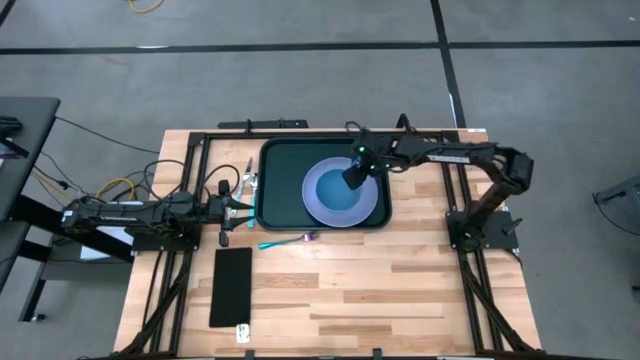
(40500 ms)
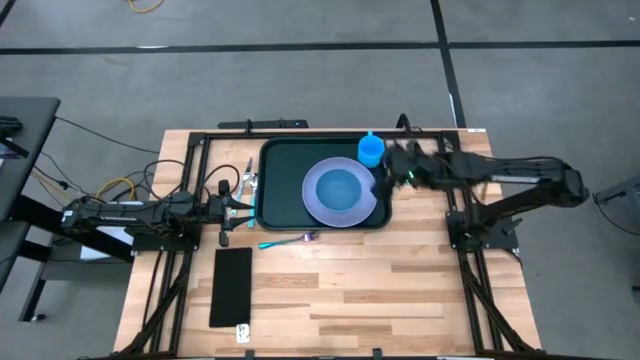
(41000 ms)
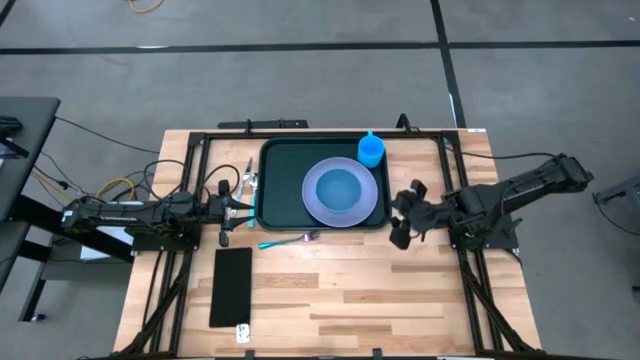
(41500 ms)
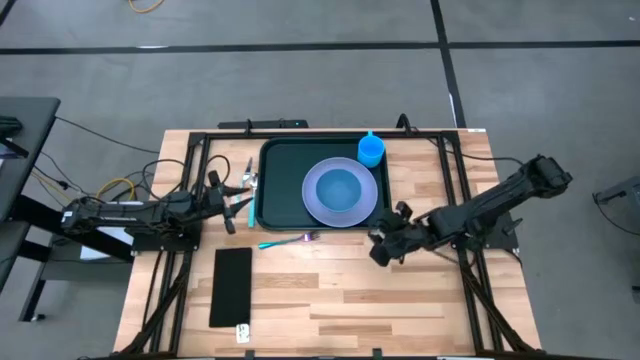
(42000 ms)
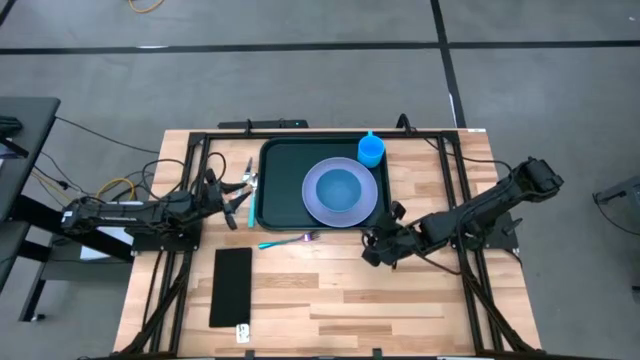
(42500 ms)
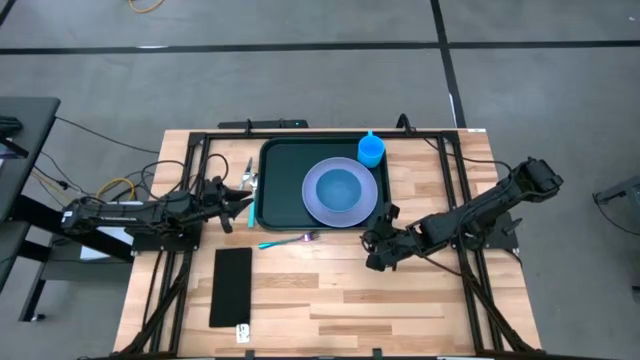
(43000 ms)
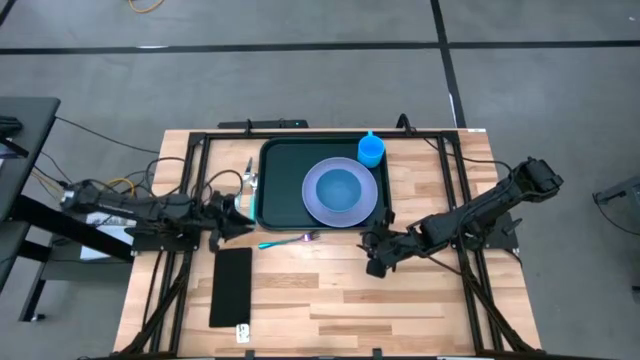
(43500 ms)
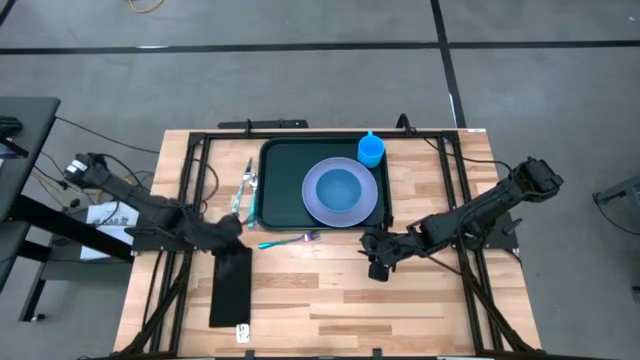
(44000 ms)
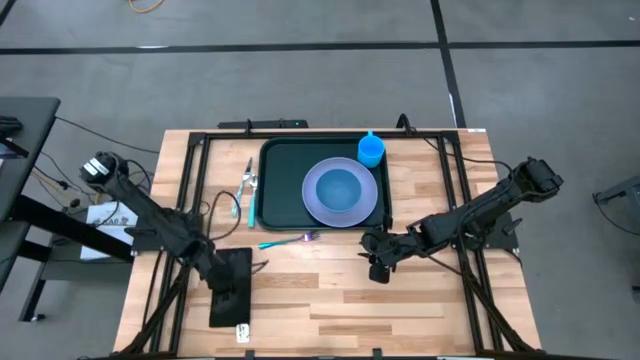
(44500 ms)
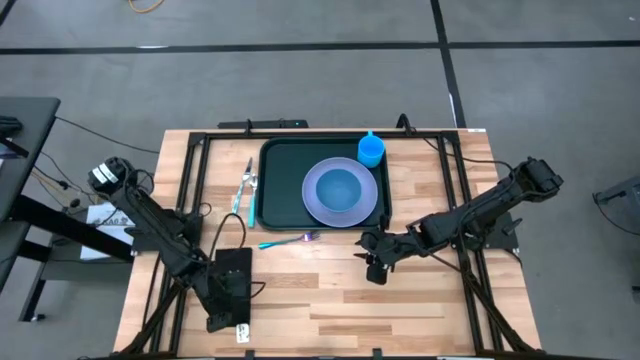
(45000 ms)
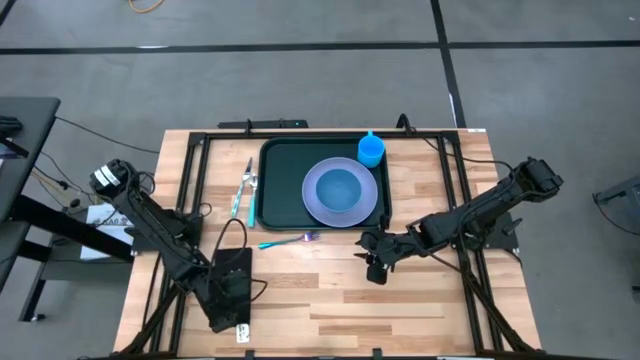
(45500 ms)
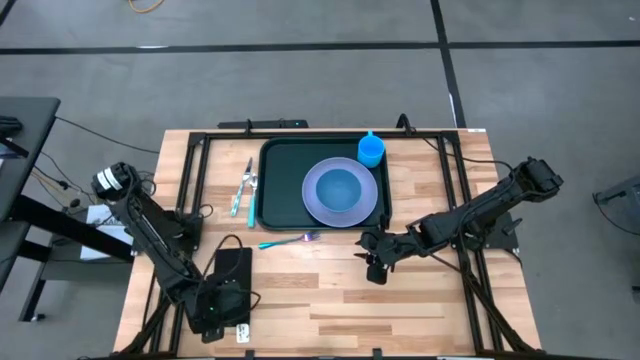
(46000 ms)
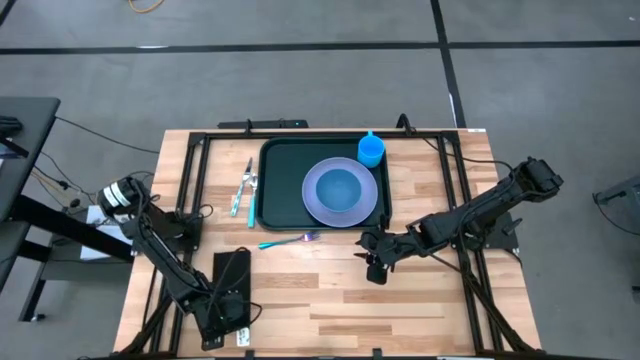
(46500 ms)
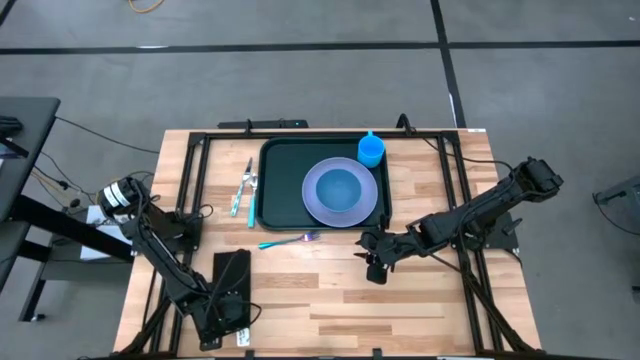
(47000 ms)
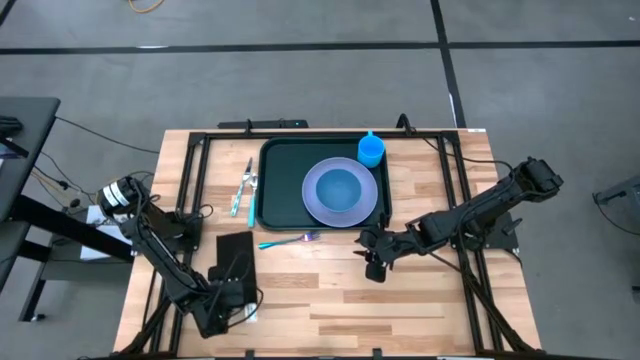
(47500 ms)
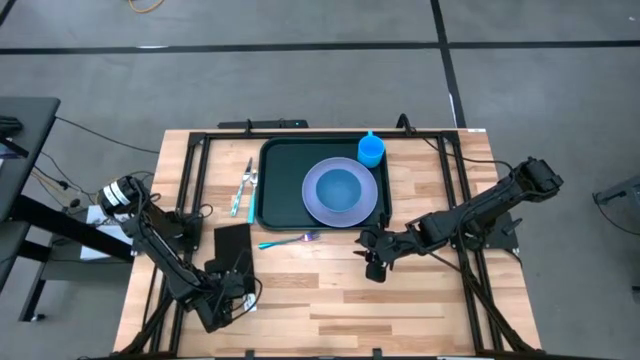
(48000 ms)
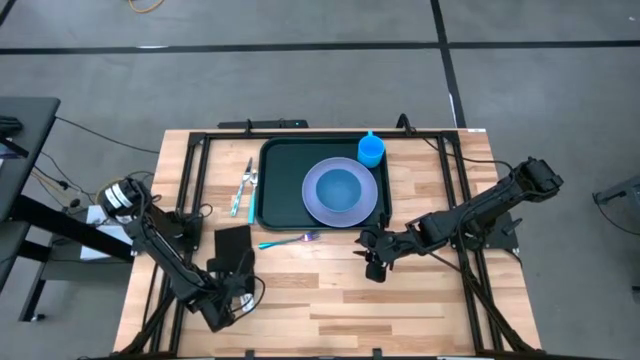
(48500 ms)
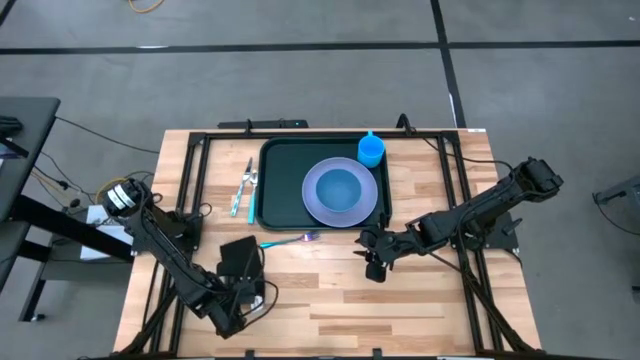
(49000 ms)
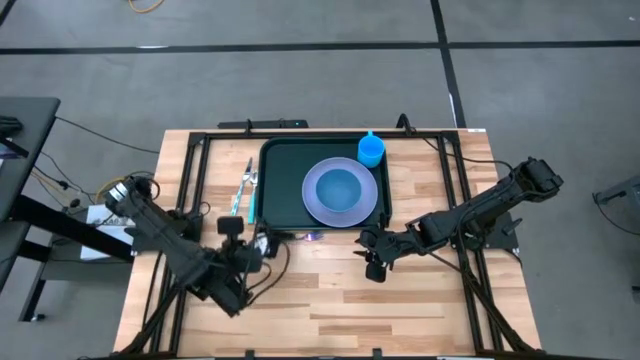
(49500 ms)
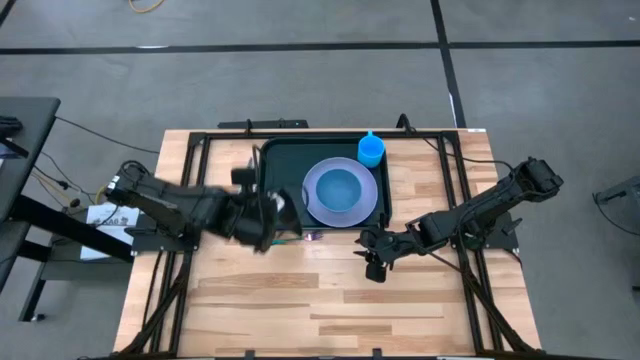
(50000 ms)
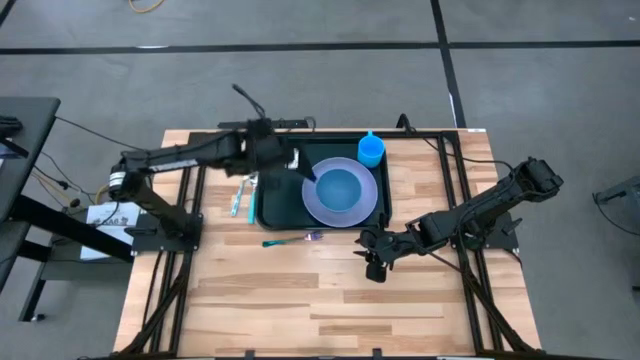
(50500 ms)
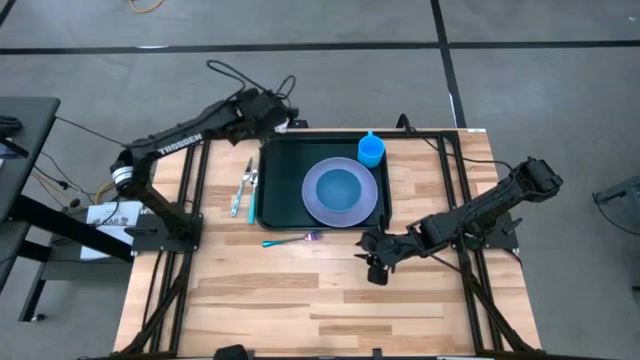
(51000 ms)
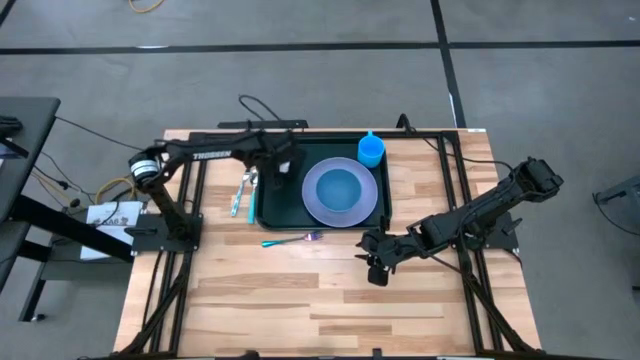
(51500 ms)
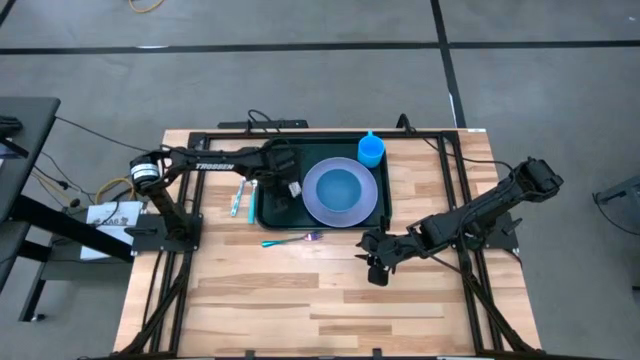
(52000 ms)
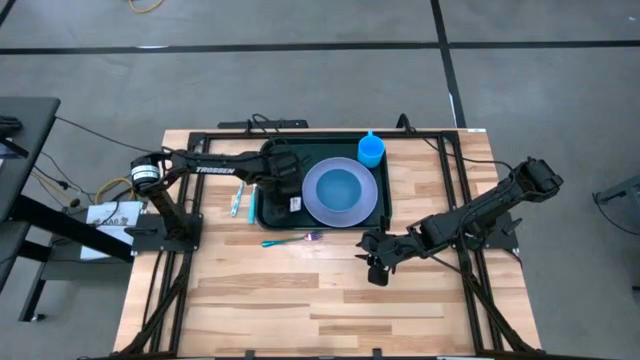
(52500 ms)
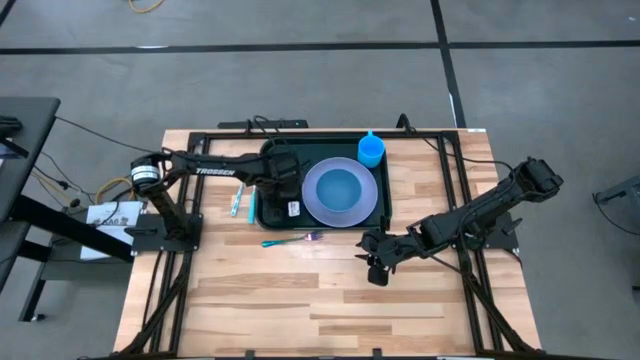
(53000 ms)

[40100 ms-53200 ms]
Task: Set up tray
Put the black napkin on the black serving tray to the left of the purple plate

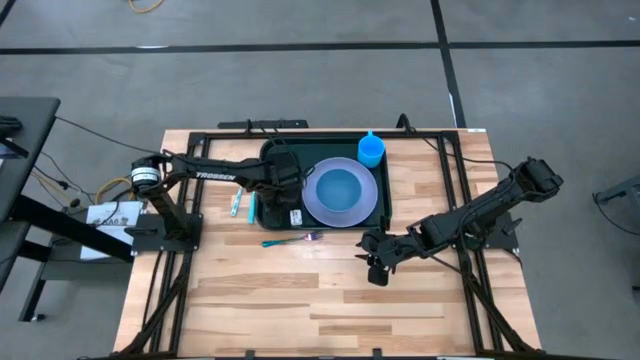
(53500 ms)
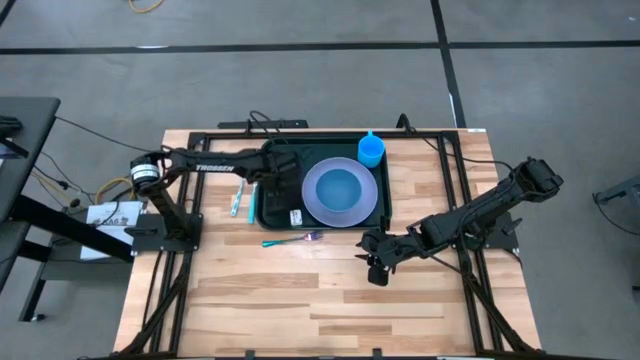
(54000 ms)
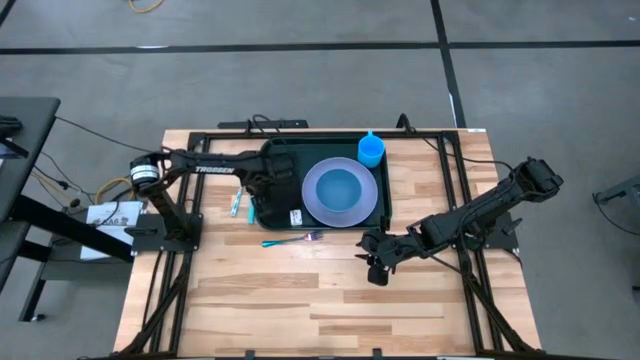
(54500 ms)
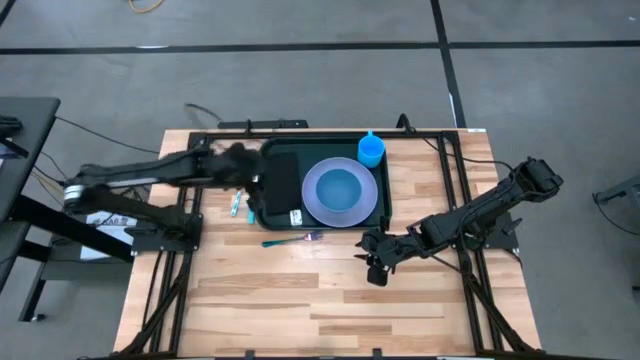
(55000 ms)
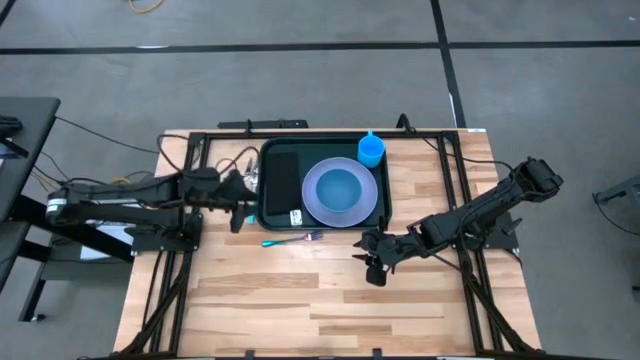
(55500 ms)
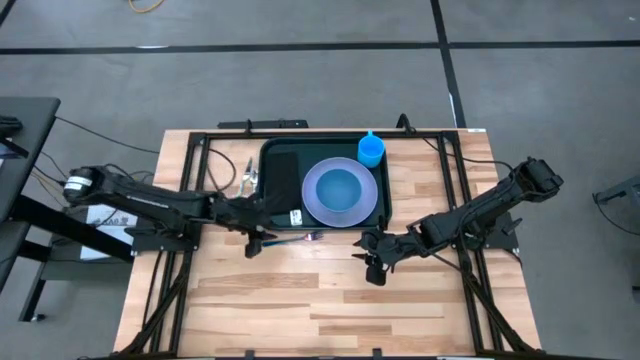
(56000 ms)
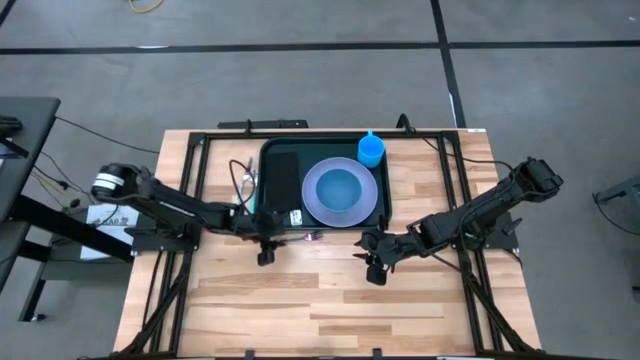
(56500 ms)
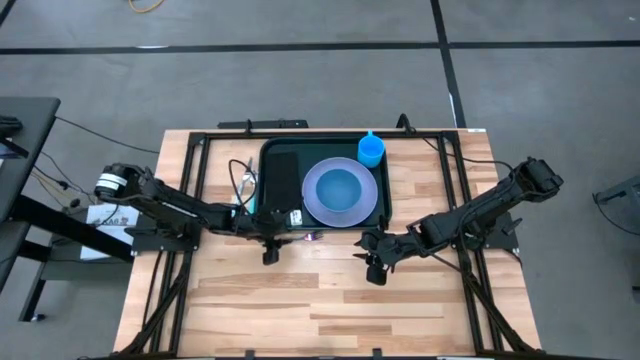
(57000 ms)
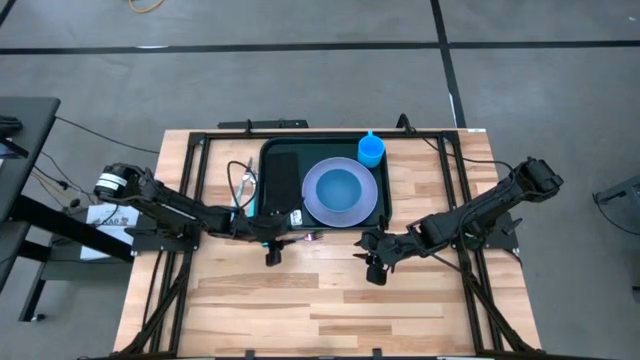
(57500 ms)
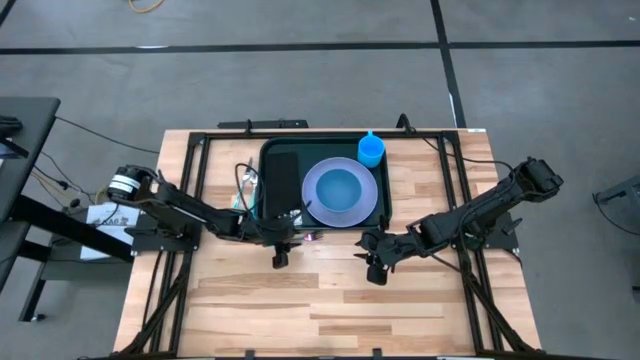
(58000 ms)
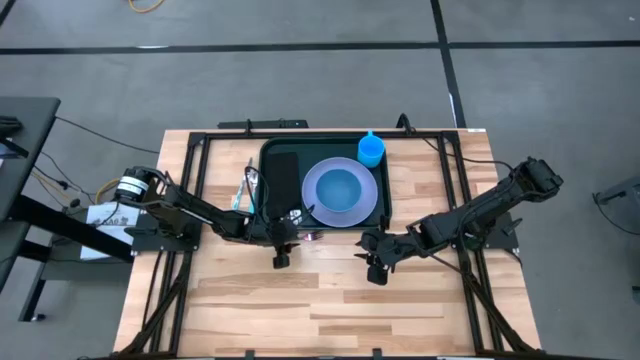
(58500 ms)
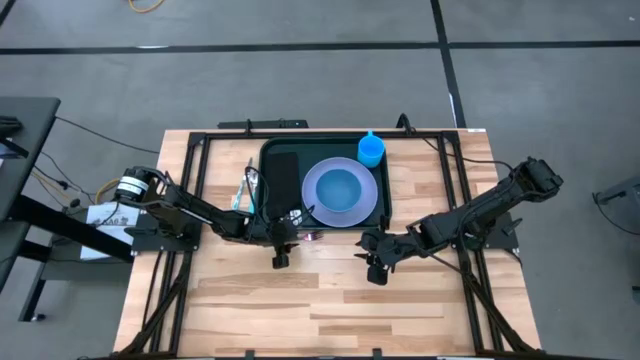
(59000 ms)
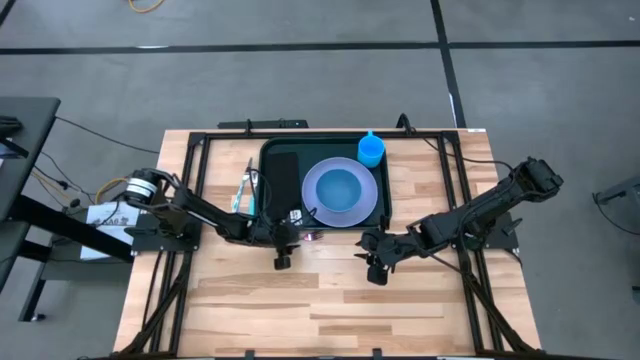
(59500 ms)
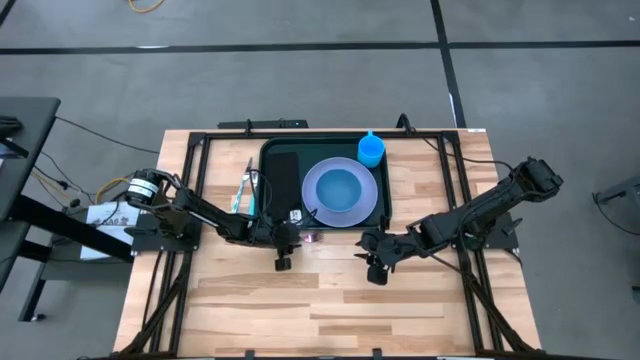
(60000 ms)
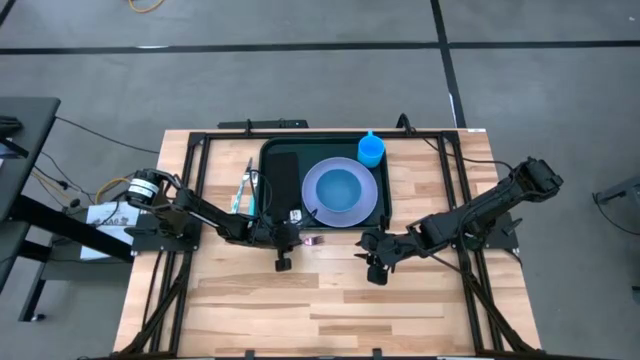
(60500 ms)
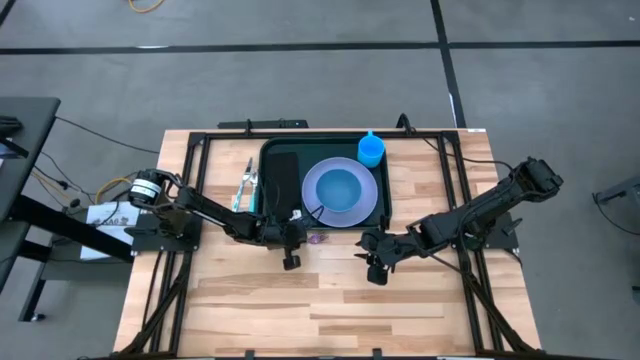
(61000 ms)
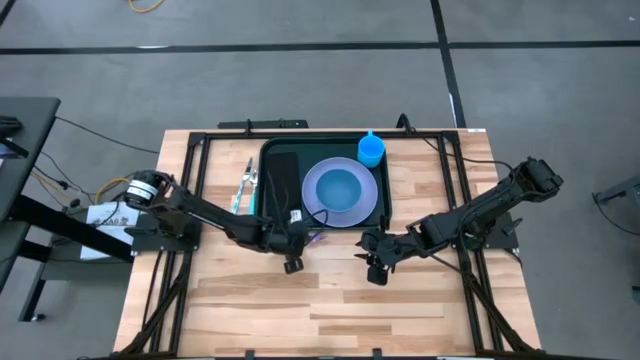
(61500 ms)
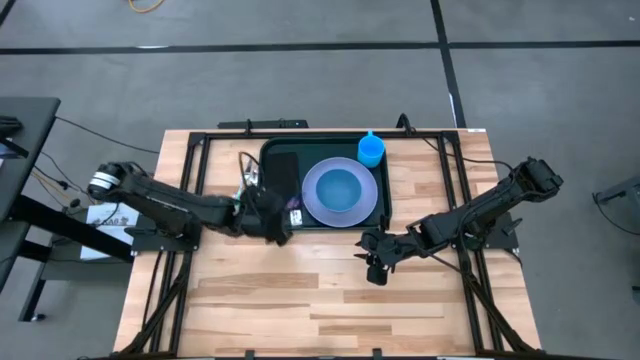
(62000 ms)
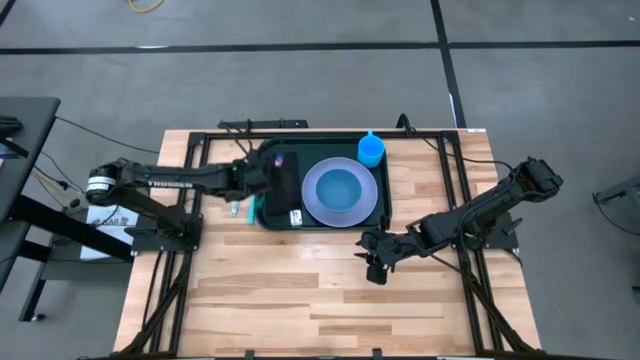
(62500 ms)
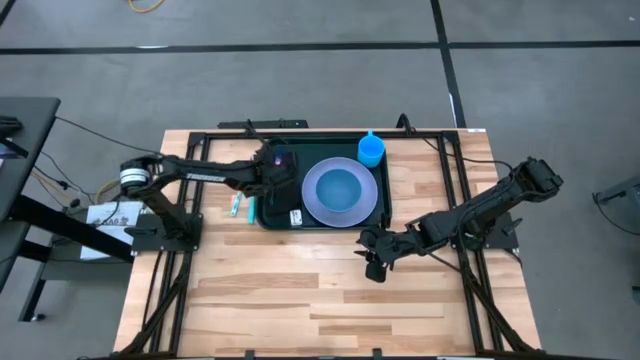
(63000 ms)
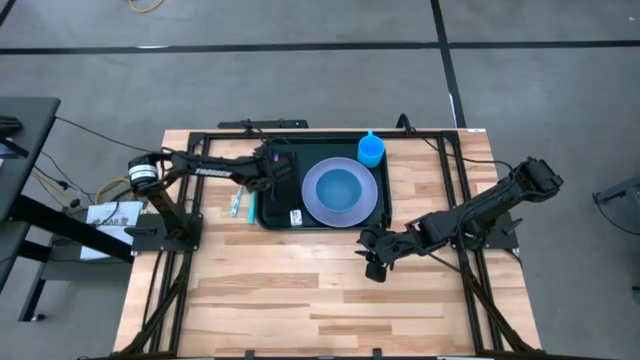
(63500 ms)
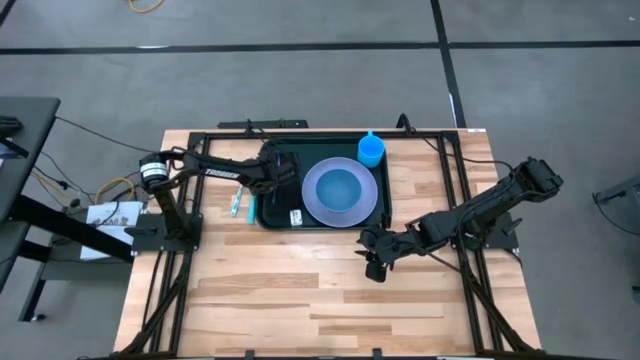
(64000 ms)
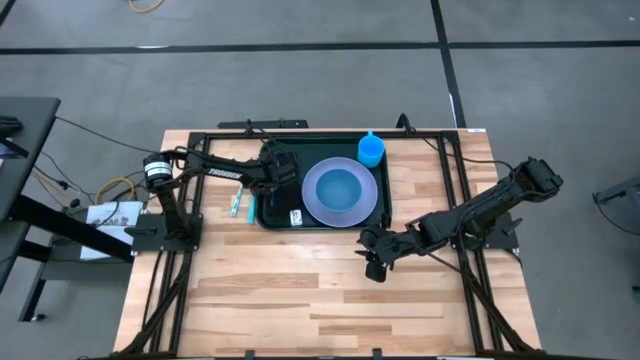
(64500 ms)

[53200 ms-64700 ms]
Put the blue fork on the black napkin
